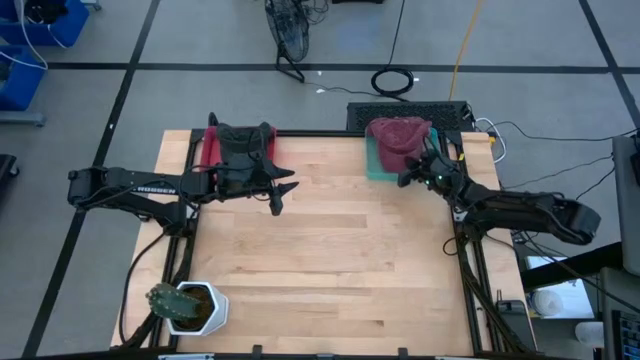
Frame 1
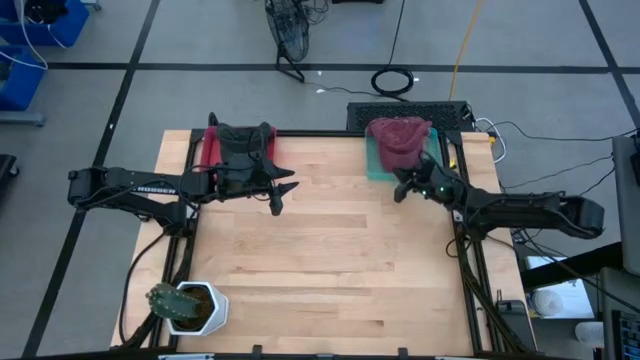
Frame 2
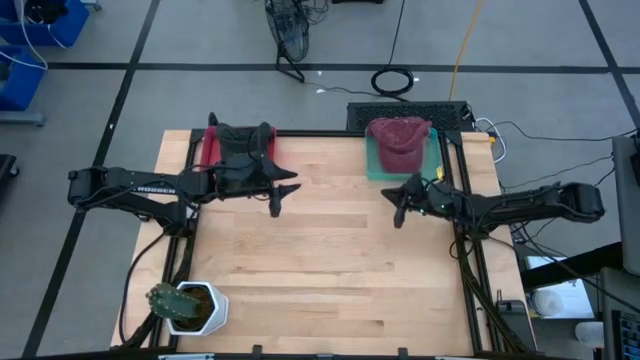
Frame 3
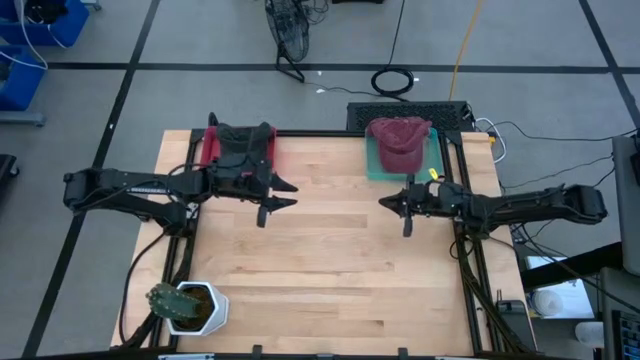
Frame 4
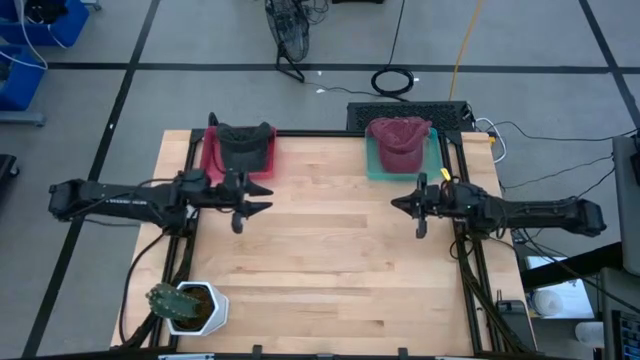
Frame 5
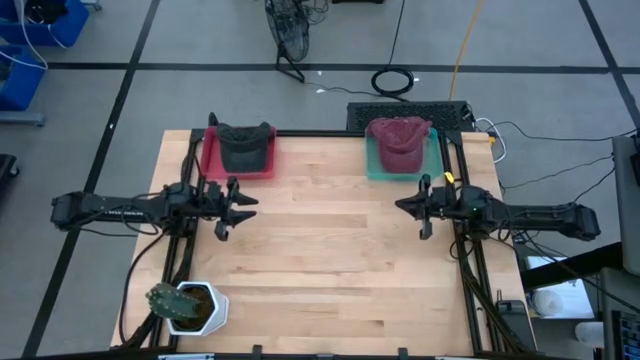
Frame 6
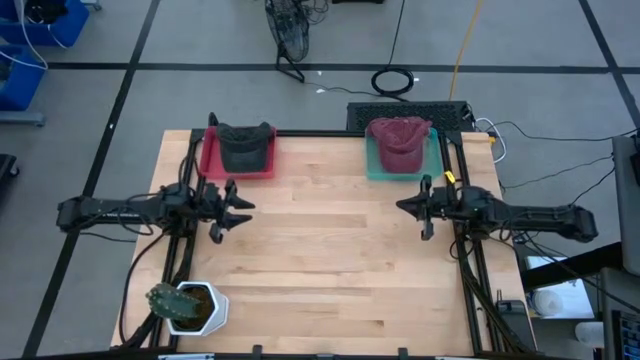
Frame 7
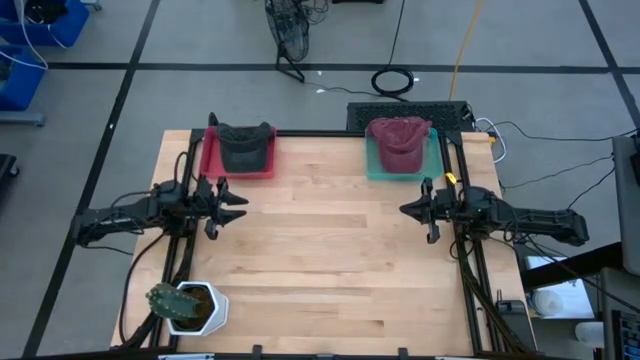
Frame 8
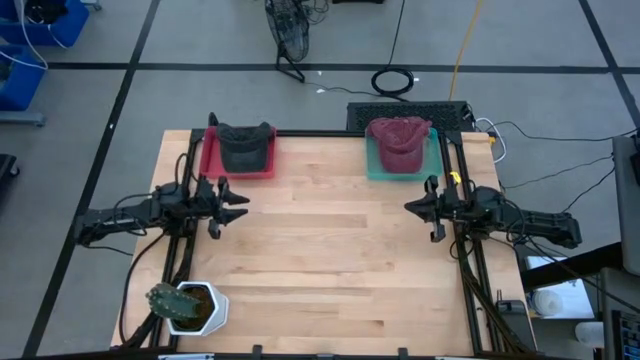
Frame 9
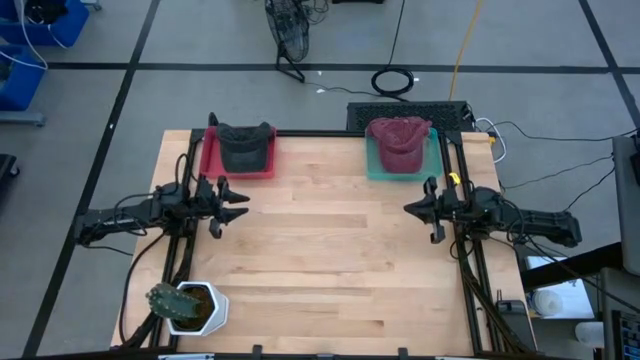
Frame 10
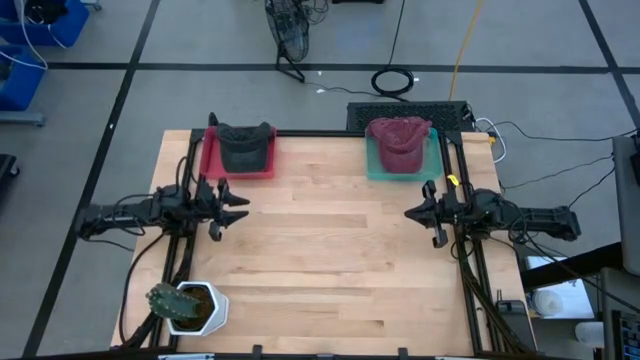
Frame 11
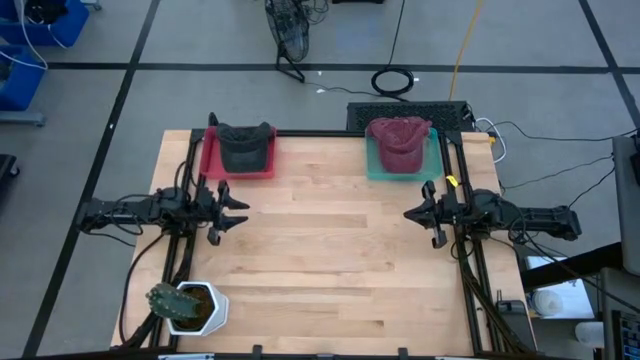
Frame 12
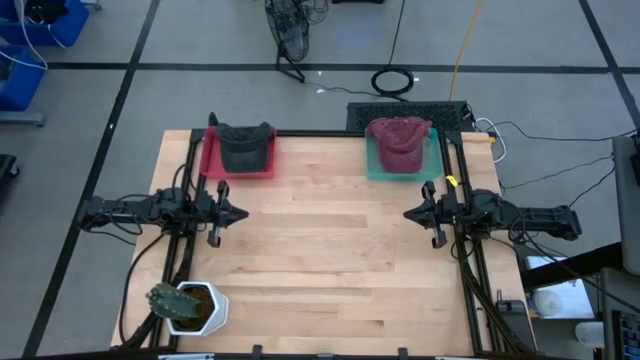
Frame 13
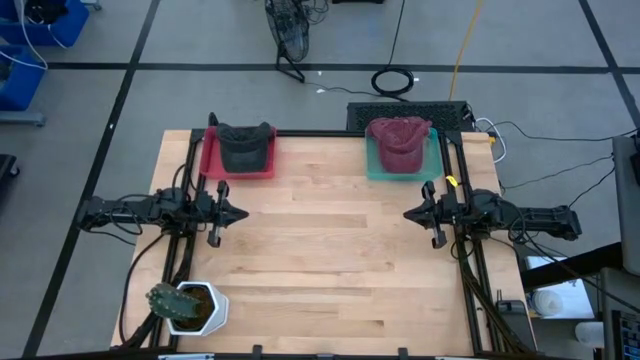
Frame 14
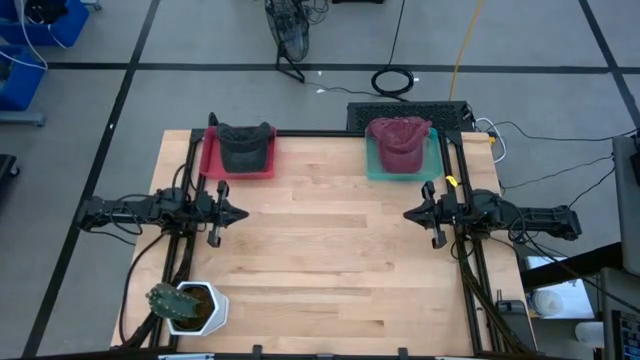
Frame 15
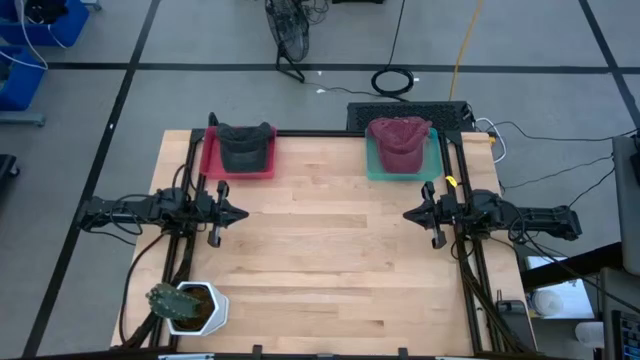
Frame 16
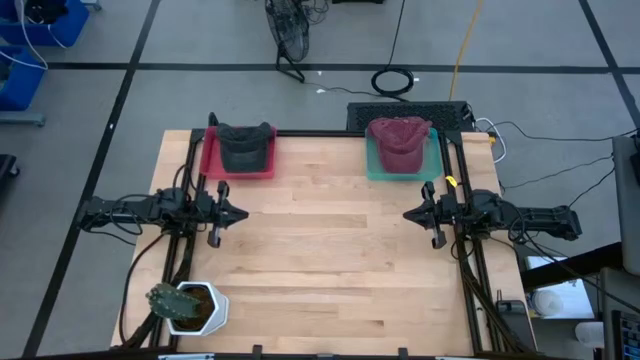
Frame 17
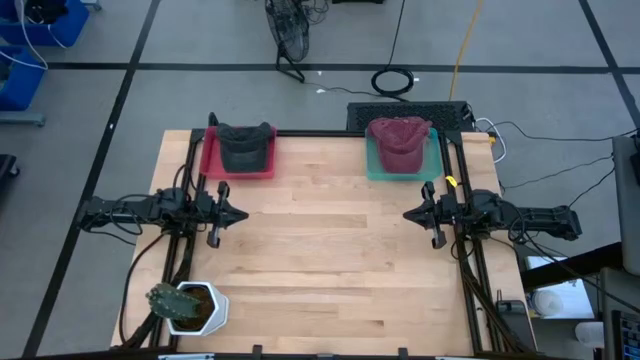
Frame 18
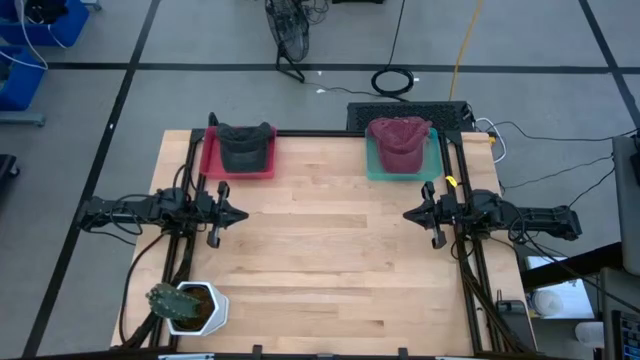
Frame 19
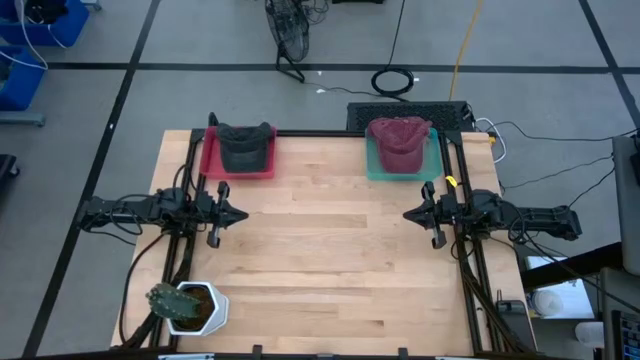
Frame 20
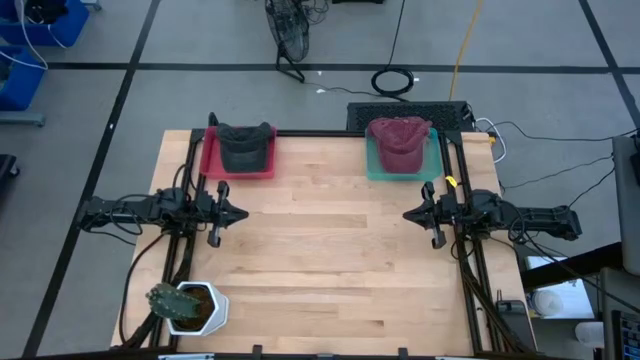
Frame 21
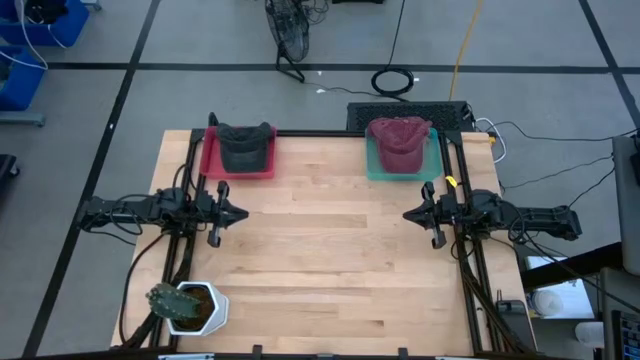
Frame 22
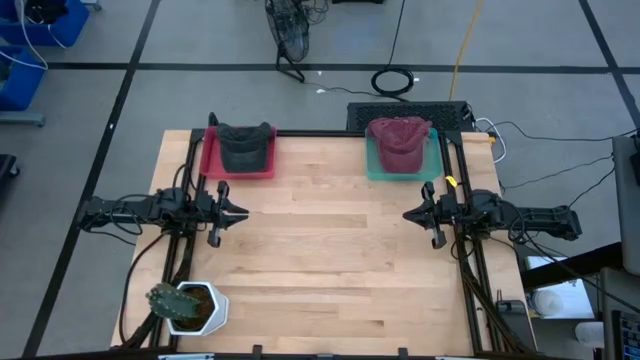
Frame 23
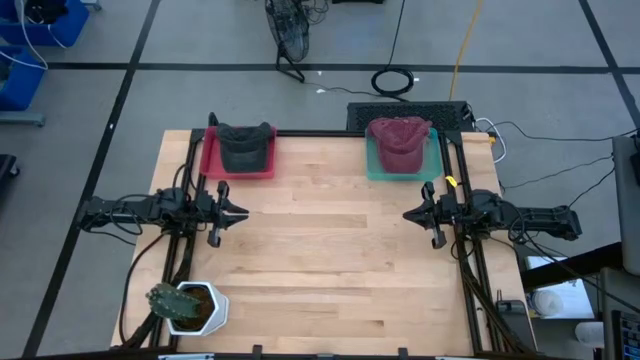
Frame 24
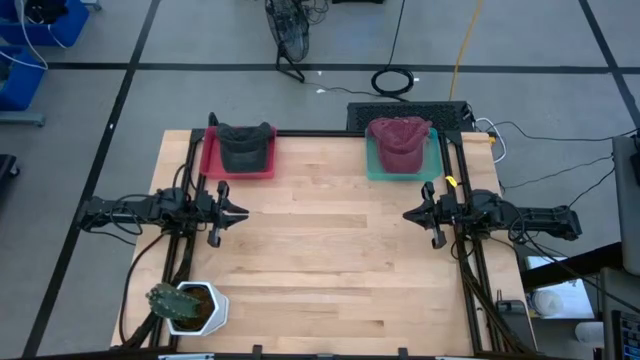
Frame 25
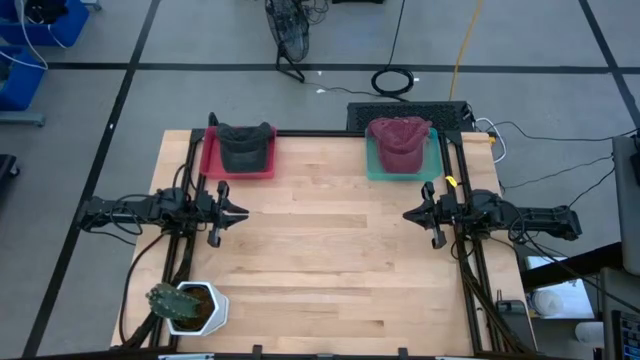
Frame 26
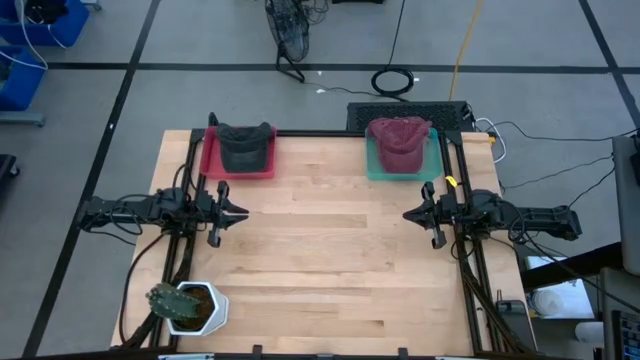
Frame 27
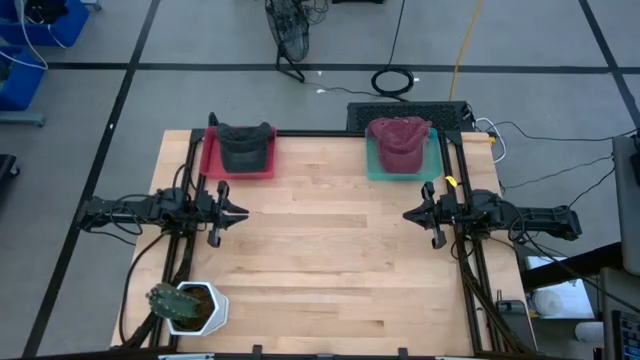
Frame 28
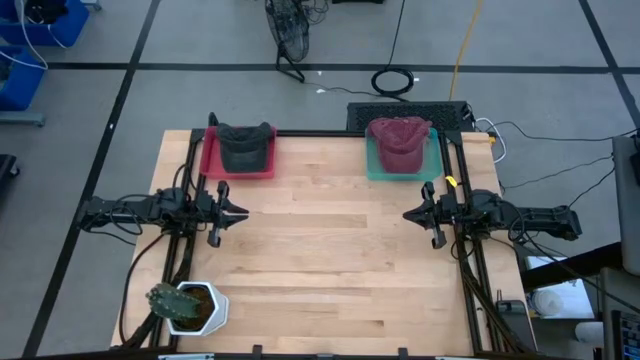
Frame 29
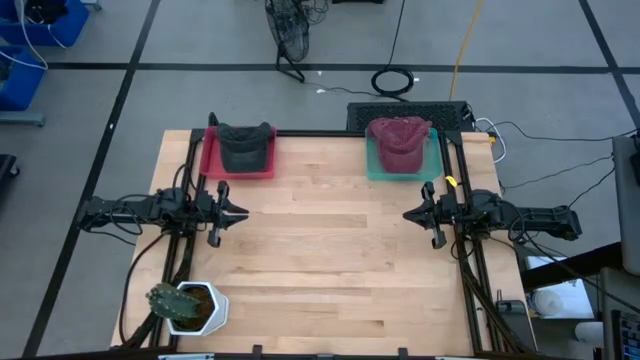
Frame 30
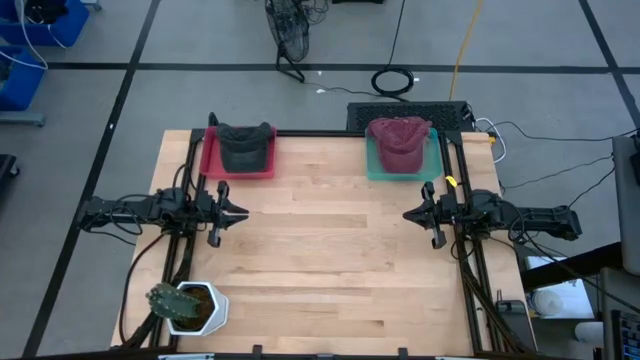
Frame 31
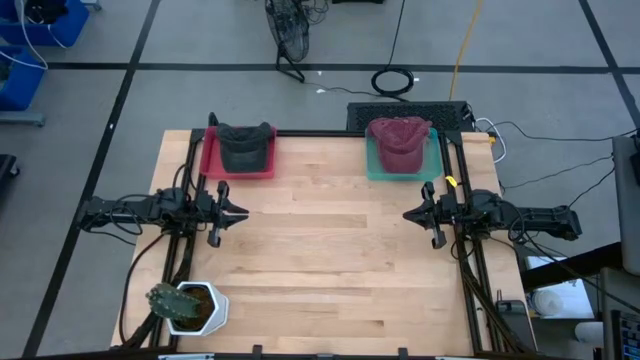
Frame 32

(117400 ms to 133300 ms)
Task: Pick & Place hat
Return to Home Position

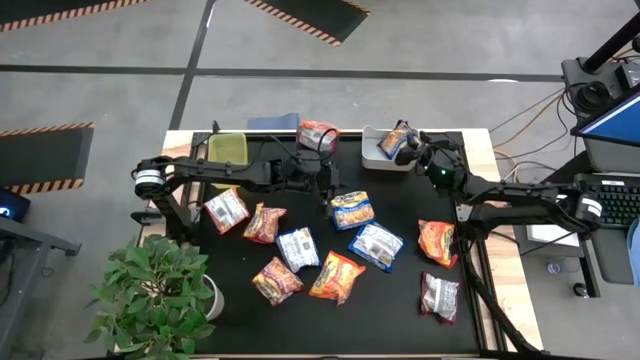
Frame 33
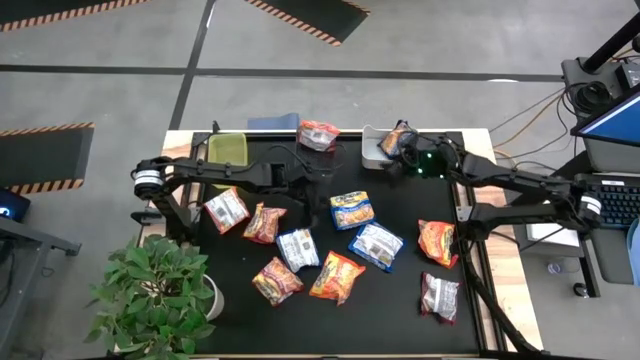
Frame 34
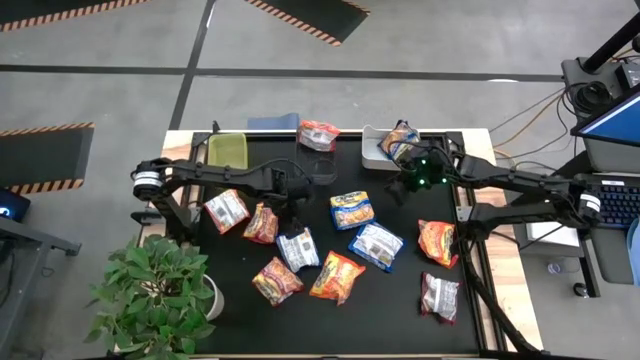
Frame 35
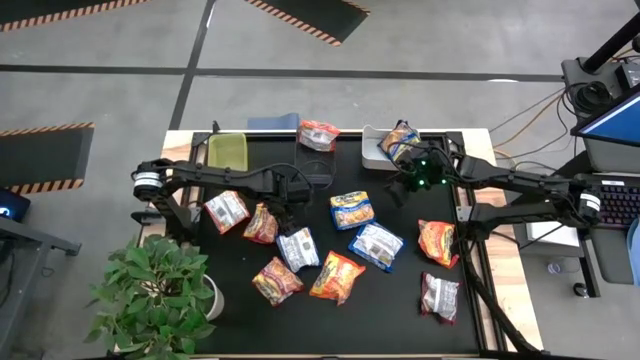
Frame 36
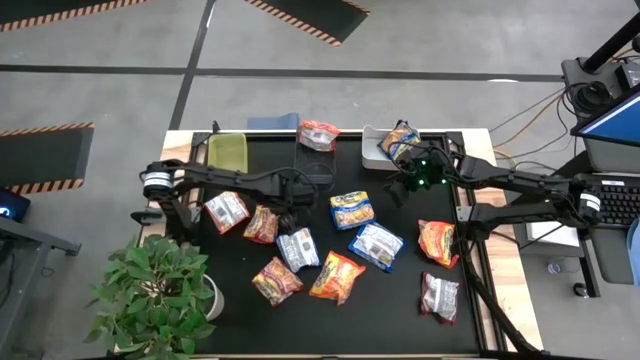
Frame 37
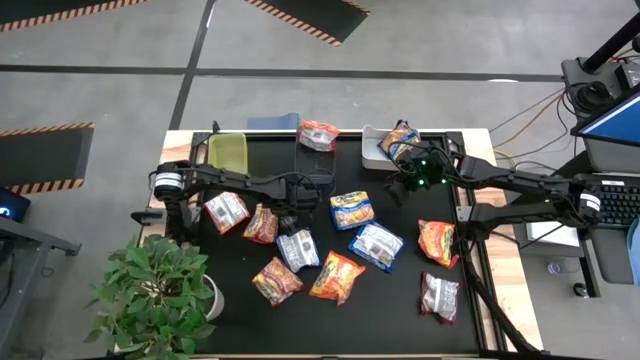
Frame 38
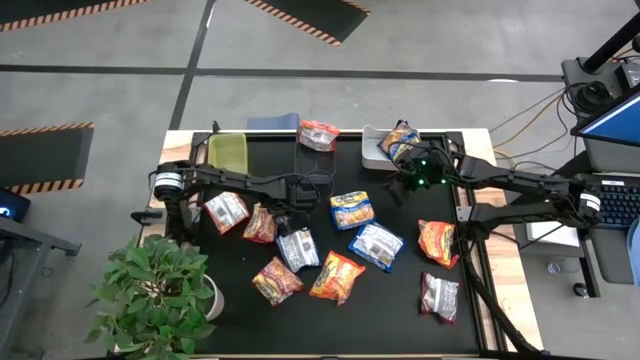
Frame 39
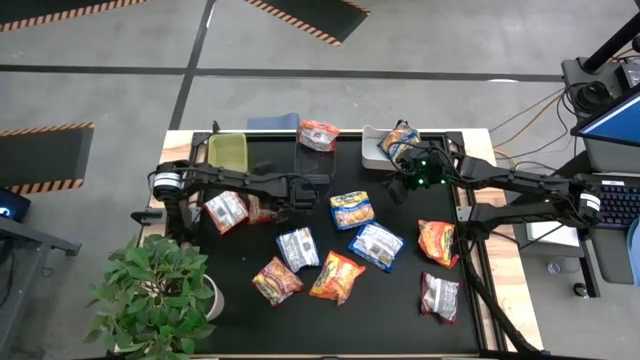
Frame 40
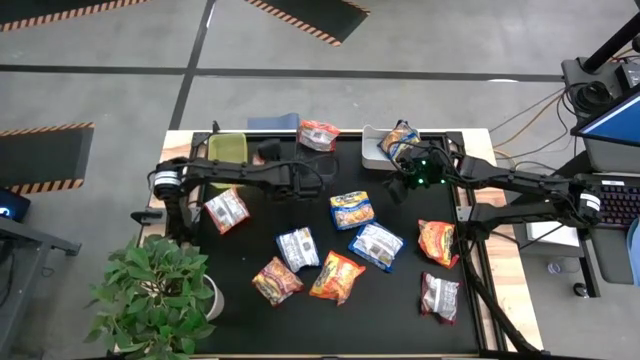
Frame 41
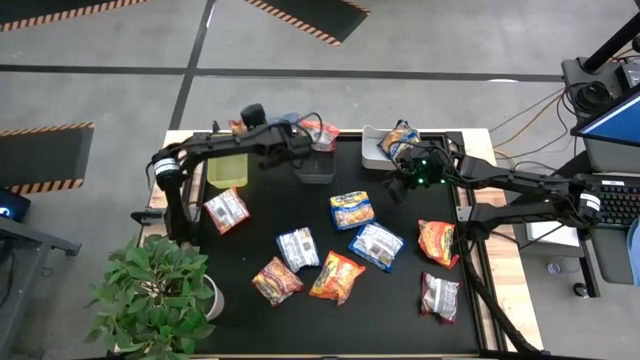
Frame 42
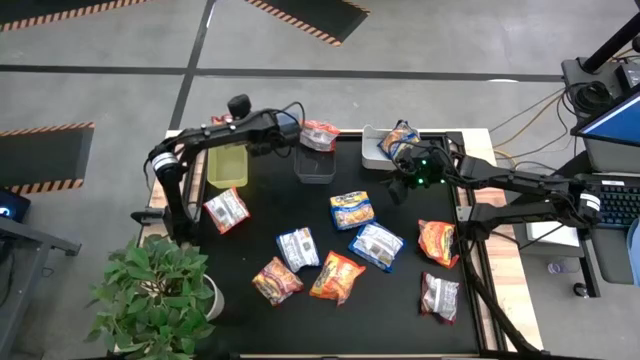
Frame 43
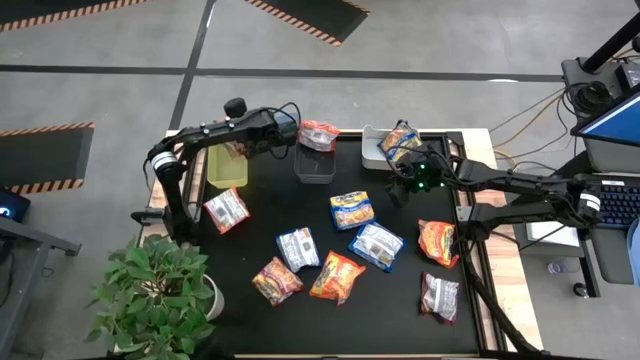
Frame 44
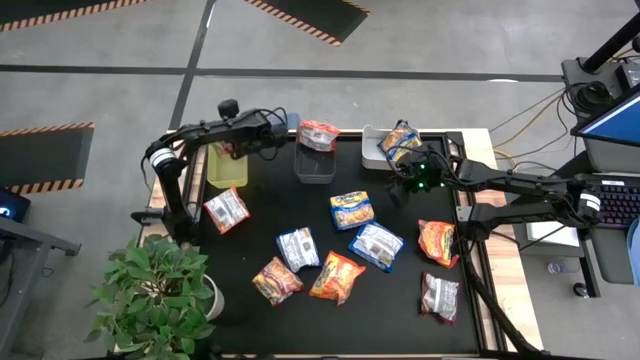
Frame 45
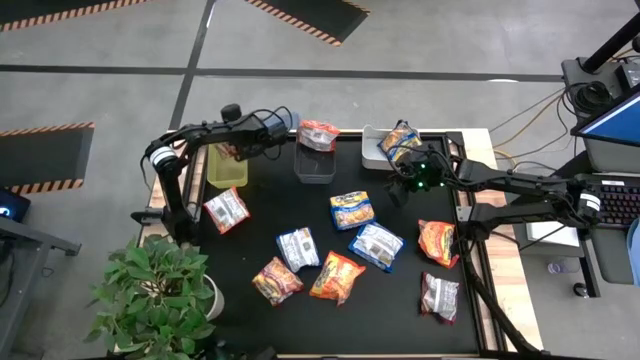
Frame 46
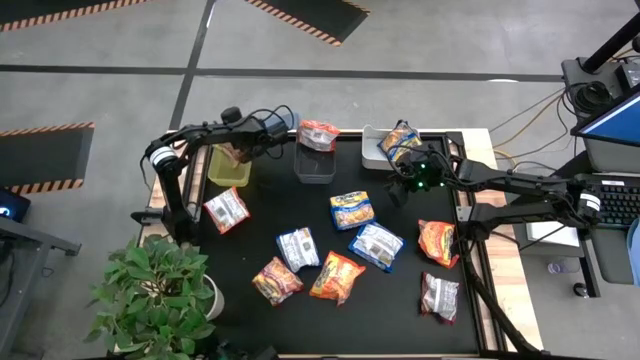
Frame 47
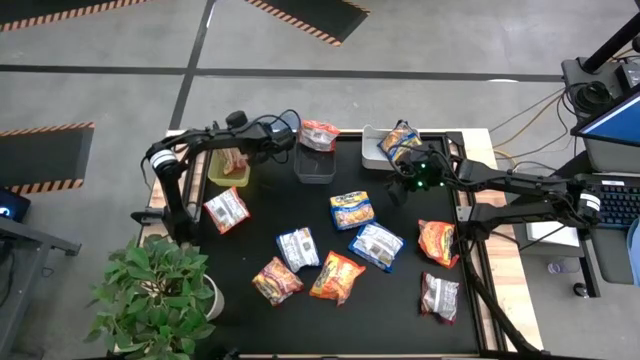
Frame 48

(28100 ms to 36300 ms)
Task: Sort Maruchan noodles
Put the red noodle pack into the yellow bin
